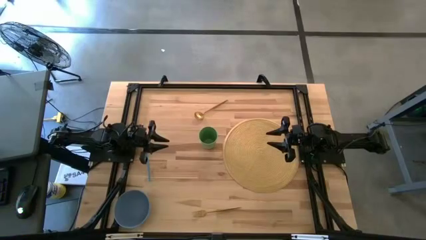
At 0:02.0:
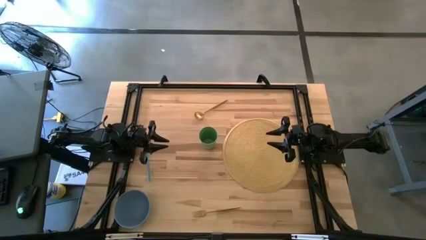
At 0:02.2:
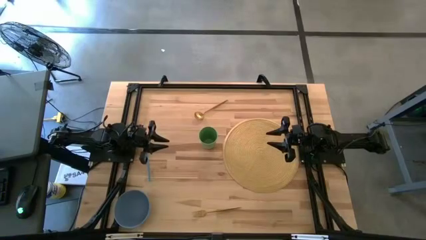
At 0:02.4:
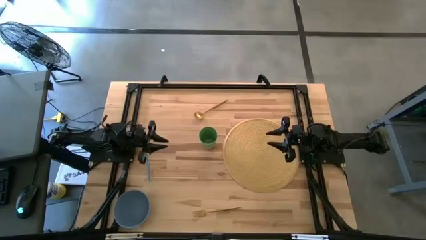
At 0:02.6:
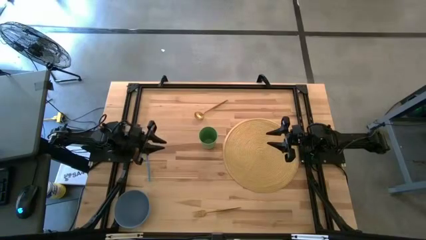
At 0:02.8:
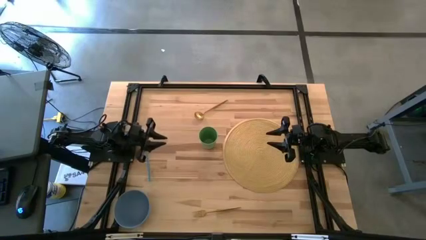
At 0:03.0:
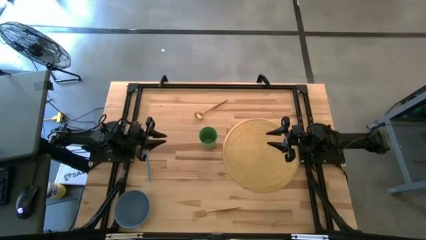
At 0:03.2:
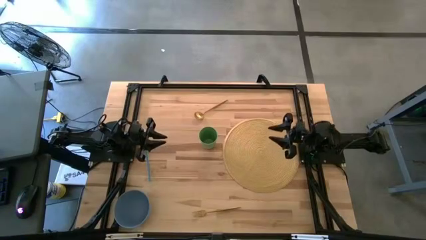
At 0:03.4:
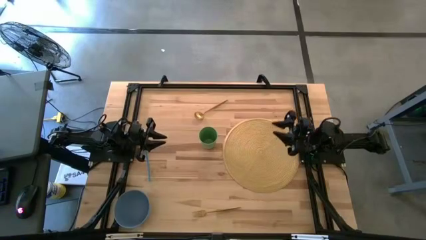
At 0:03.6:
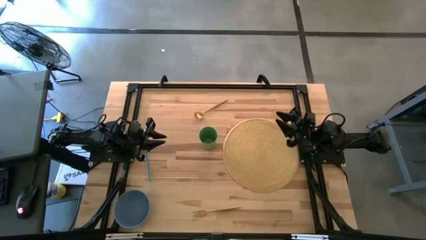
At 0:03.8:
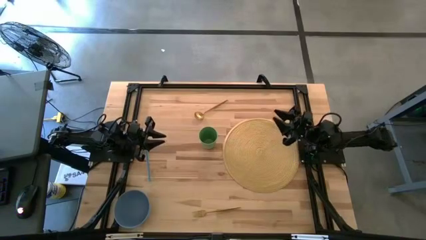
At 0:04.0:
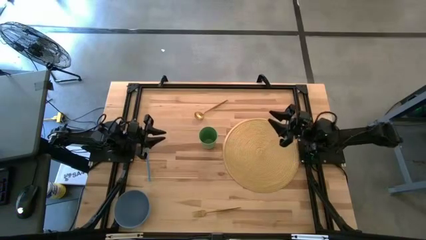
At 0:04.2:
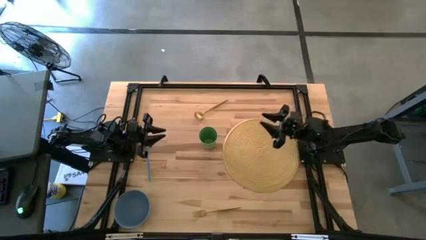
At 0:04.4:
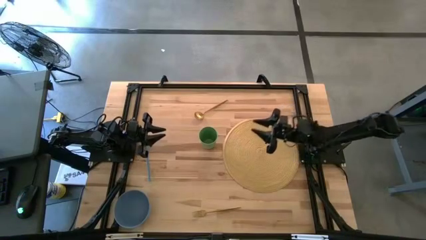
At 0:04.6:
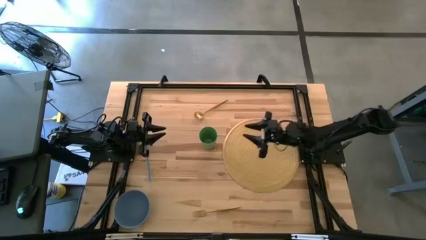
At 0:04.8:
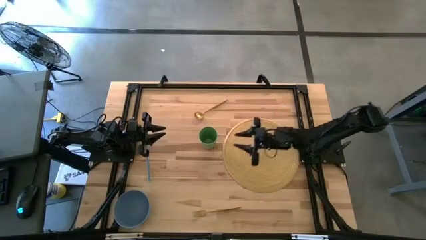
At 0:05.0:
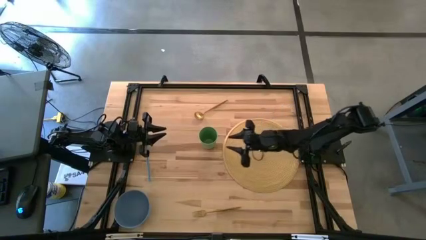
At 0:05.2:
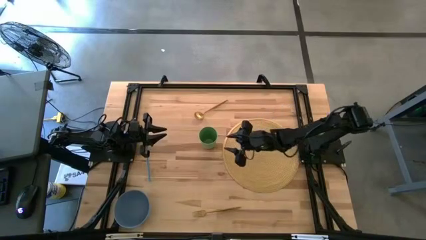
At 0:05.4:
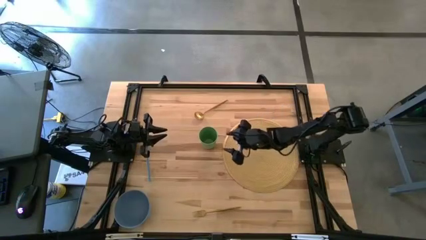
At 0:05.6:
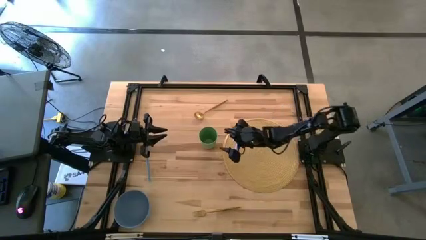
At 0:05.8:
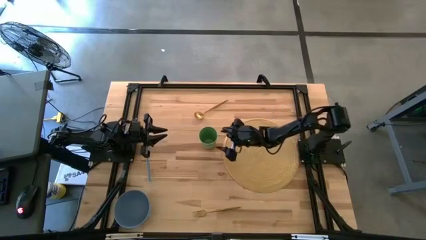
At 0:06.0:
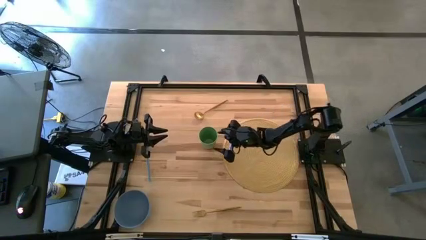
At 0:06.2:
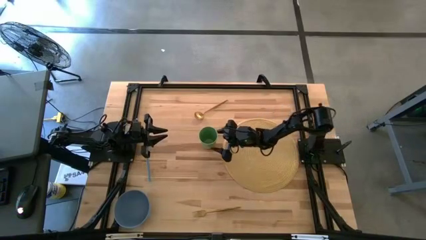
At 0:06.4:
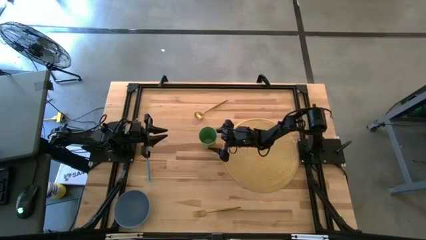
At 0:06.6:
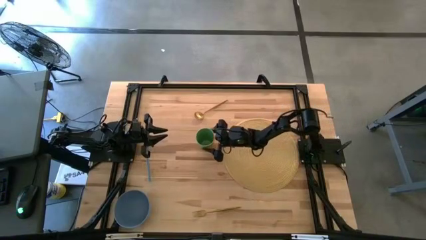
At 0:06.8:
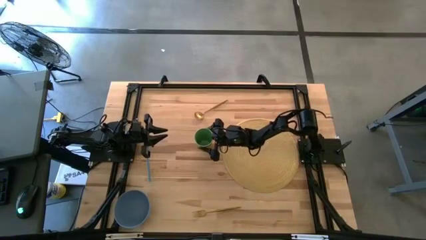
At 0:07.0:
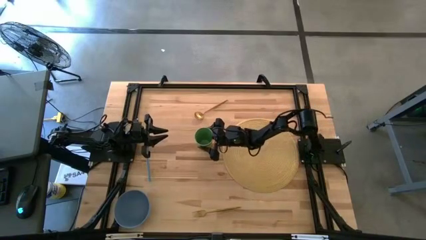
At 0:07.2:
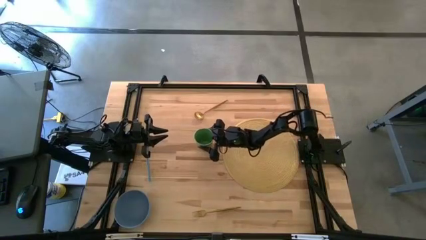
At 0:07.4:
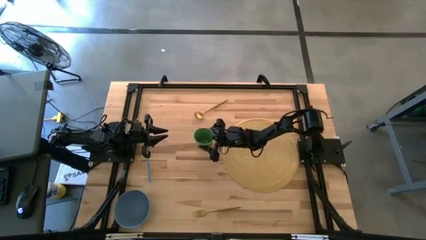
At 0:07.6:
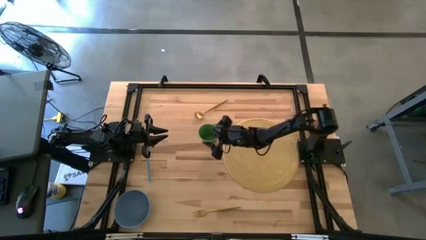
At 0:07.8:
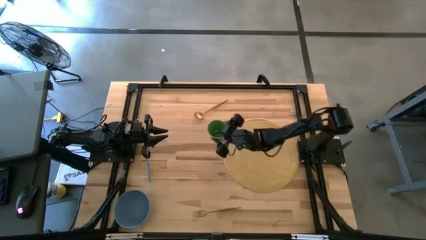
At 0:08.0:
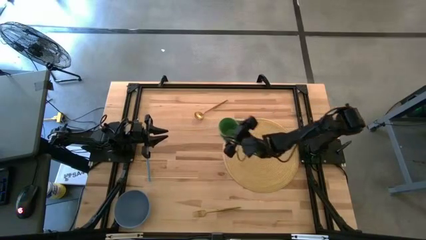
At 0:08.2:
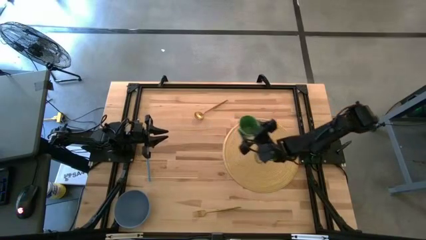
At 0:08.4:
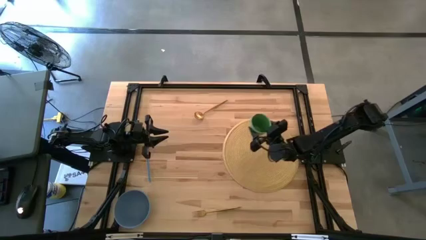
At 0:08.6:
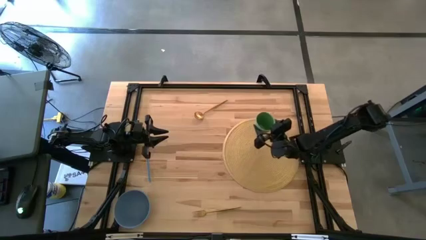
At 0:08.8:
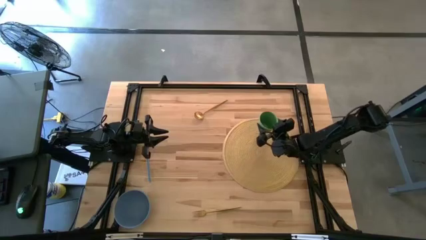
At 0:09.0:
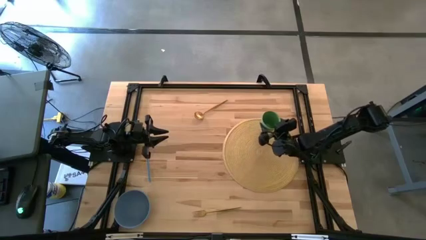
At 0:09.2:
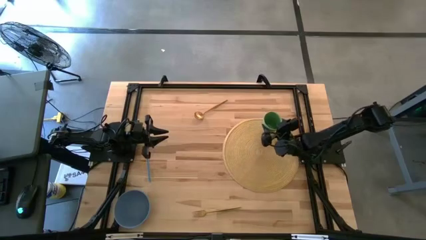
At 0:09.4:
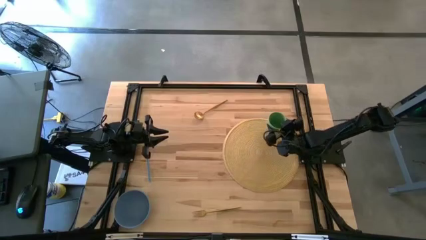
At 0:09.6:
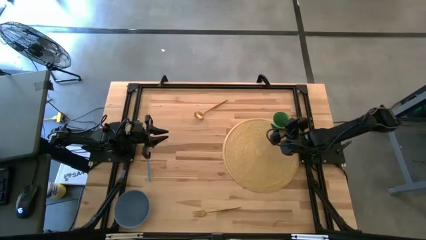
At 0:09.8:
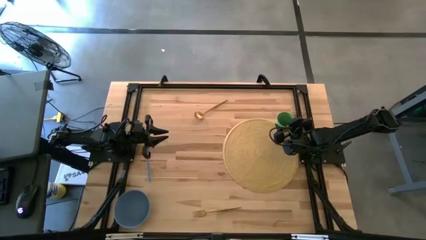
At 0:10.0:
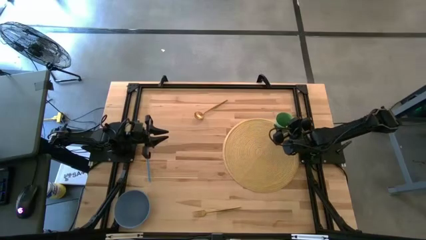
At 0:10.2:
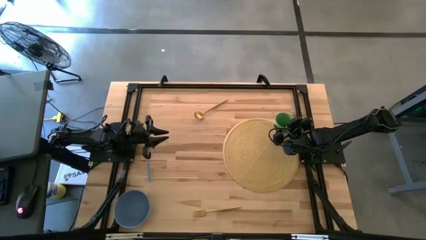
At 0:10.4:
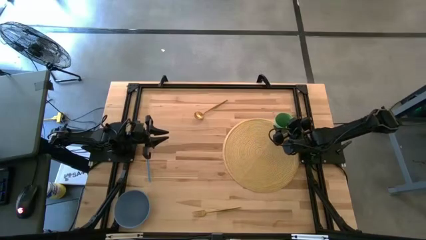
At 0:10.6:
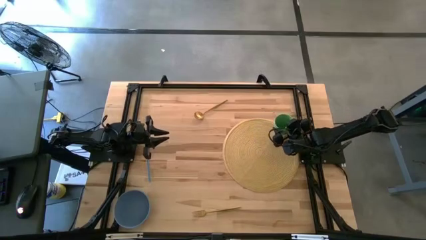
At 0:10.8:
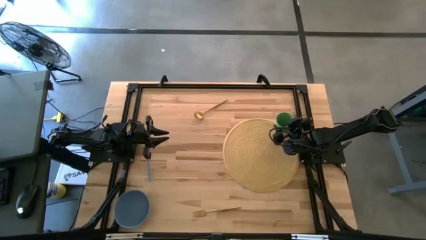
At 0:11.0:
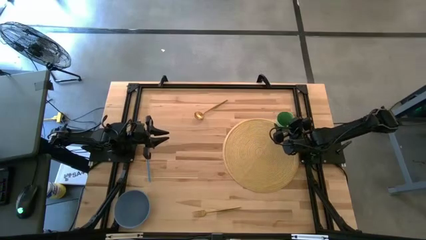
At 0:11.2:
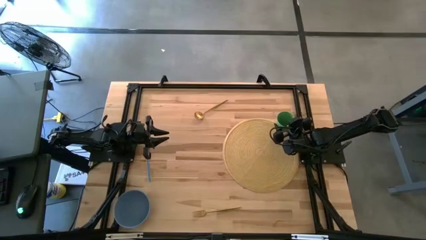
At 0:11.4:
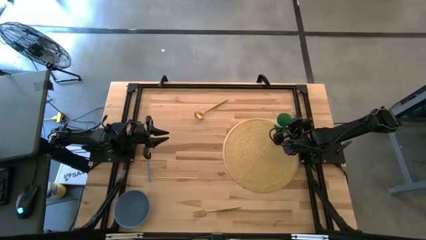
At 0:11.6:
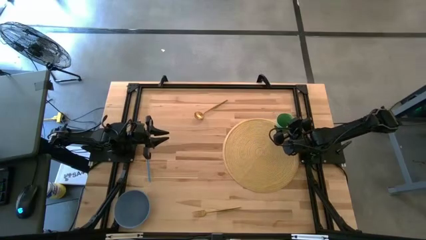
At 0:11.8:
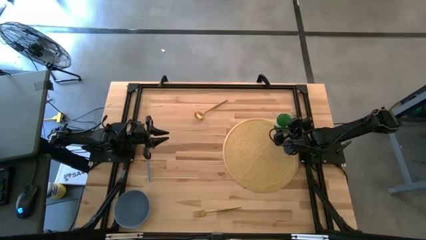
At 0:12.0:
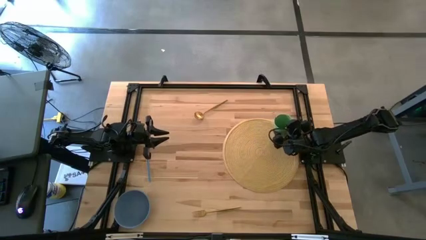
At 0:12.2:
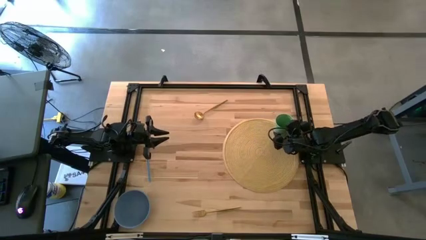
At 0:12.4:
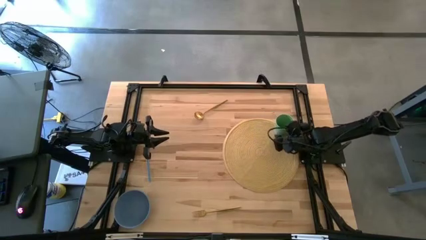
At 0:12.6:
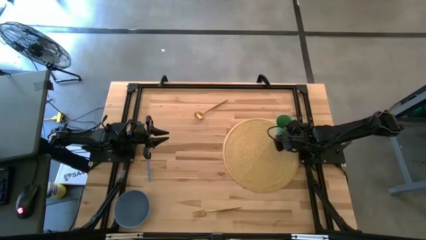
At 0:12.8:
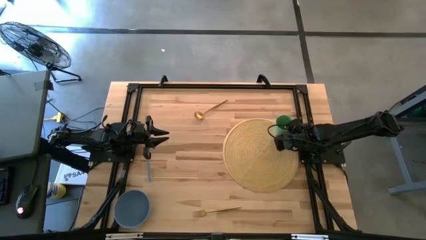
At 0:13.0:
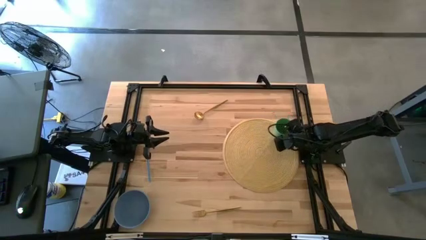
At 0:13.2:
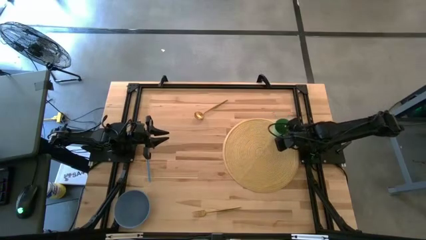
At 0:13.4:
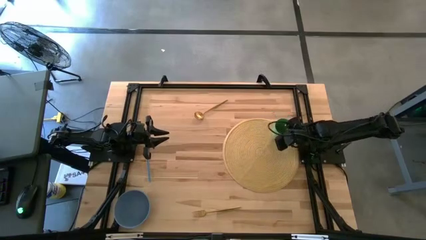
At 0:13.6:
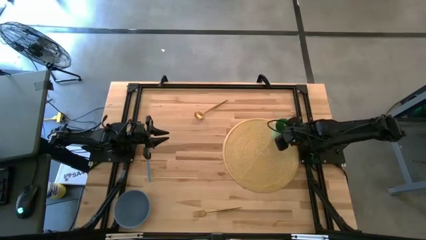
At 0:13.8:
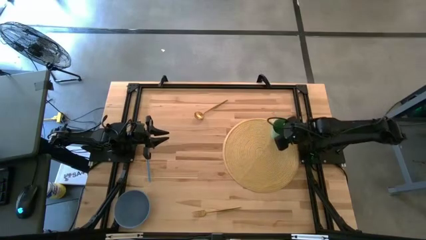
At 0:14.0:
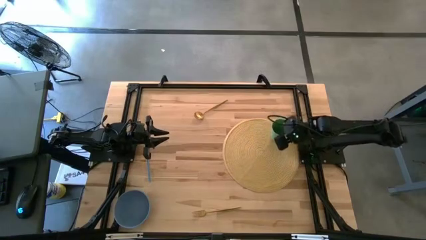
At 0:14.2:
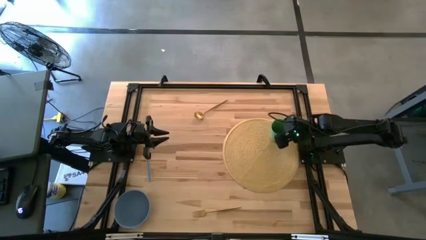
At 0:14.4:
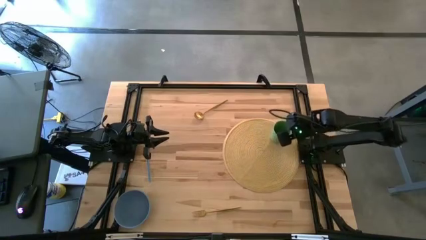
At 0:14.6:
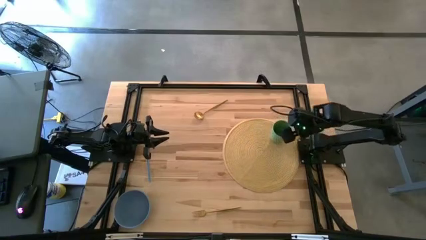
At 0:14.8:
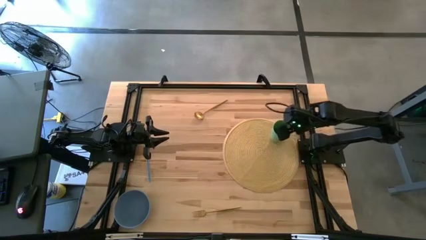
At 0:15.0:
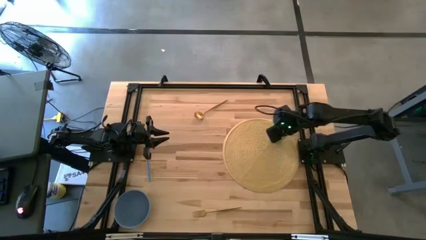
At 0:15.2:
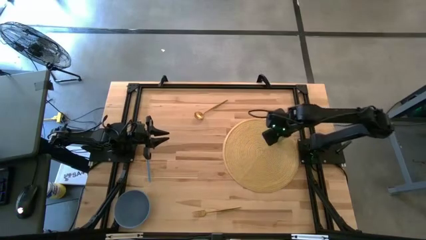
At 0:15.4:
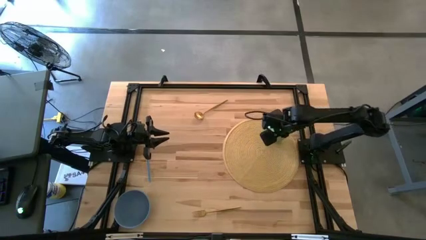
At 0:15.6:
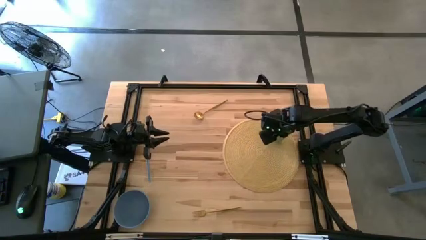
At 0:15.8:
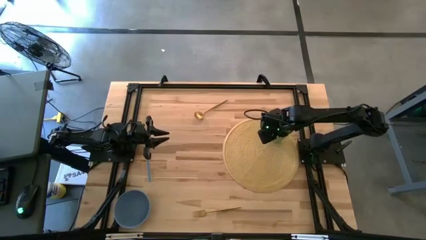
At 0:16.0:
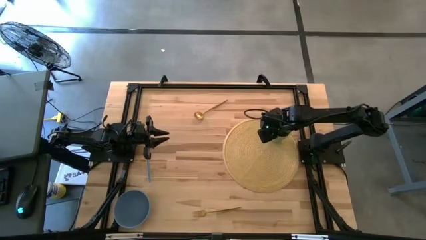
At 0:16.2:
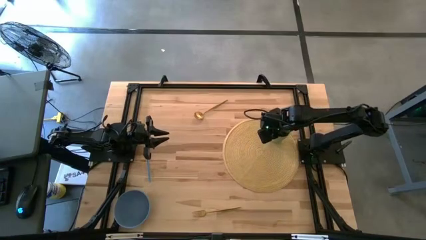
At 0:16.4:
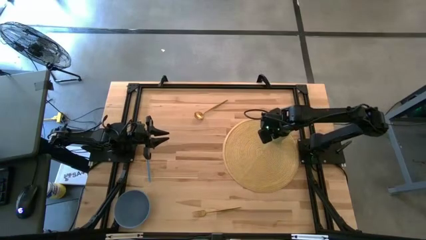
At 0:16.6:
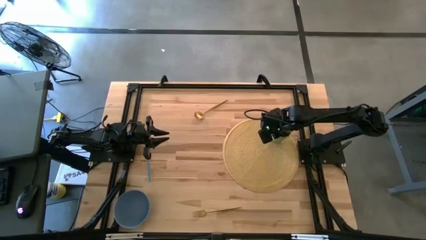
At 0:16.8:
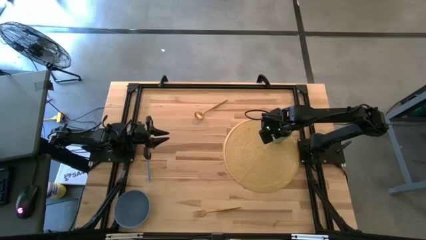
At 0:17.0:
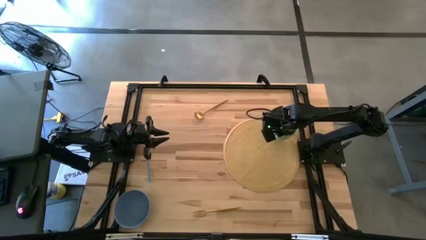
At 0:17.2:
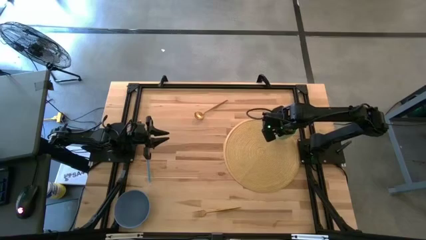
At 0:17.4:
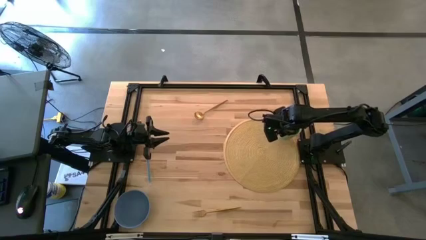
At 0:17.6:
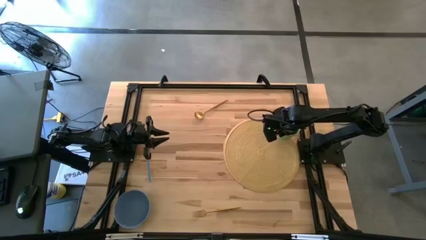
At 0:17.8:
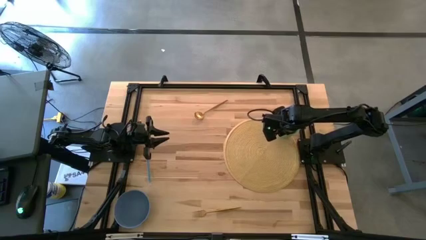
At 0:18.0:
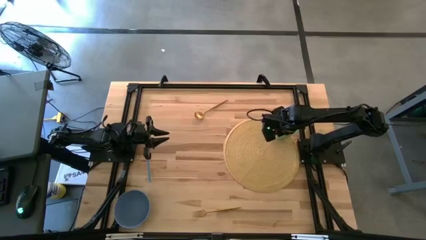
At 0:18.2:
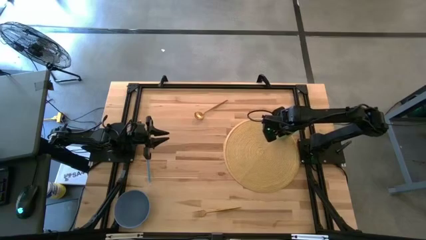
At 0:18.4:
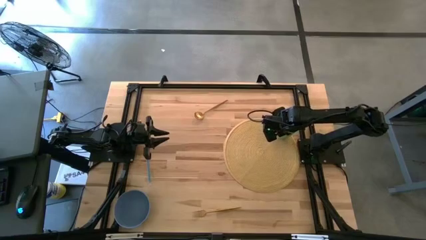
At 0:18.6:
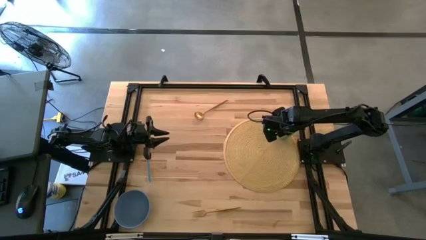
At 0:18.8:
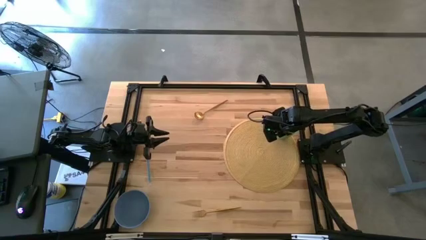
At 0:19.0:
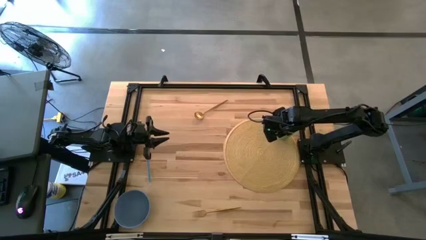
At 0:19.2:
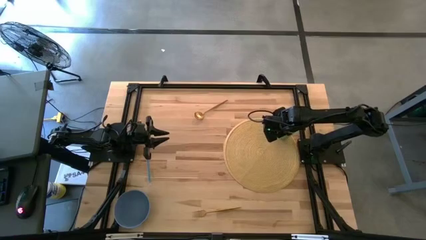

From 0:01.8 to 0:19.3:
Task: Pick & Place Utensil
Put the green cup on the brown placemat
